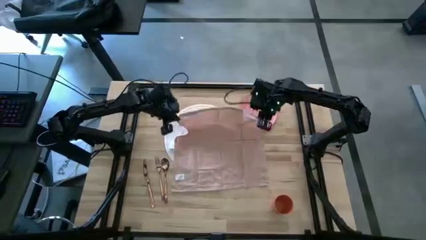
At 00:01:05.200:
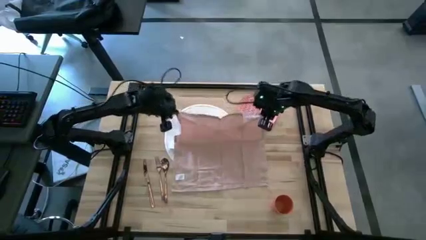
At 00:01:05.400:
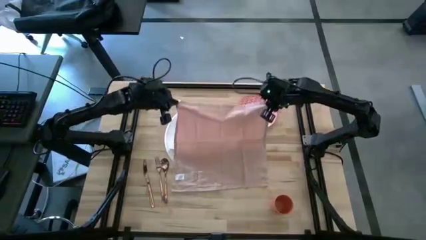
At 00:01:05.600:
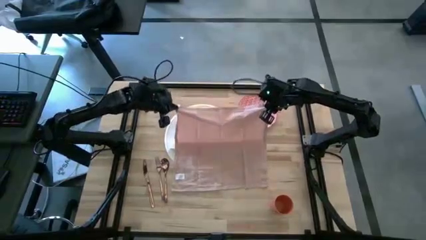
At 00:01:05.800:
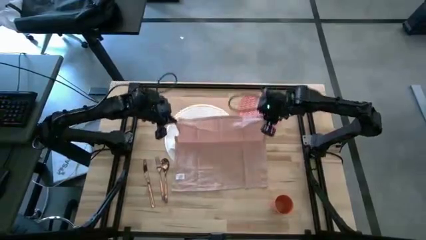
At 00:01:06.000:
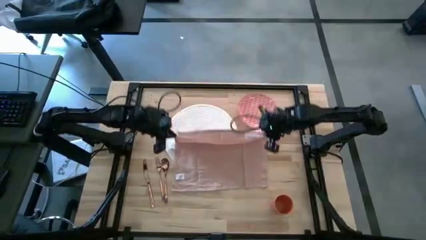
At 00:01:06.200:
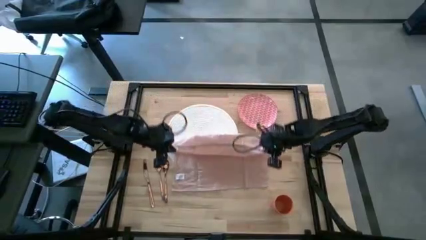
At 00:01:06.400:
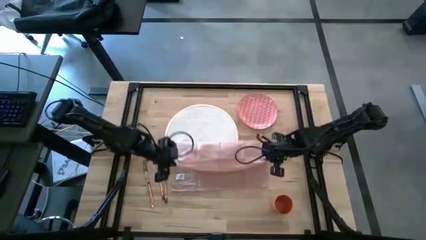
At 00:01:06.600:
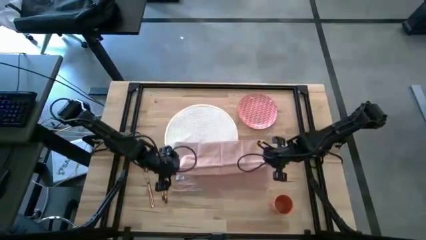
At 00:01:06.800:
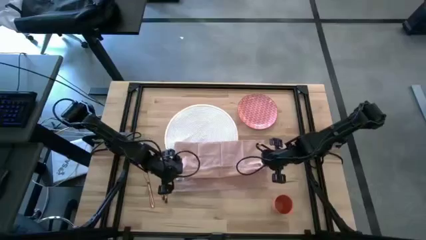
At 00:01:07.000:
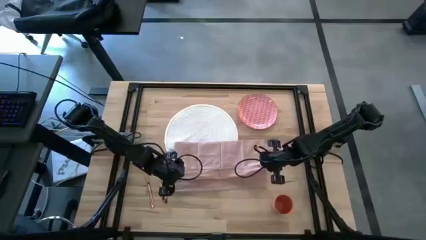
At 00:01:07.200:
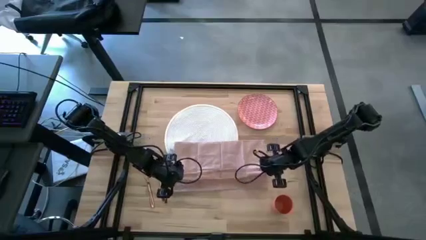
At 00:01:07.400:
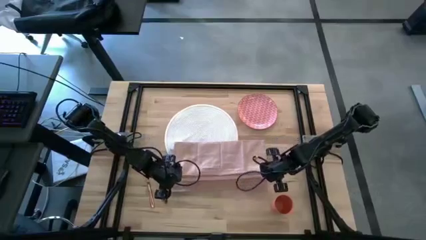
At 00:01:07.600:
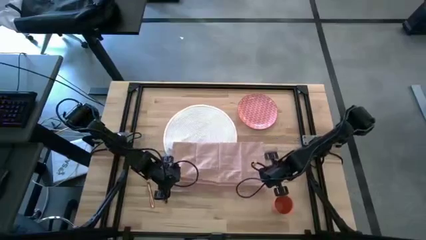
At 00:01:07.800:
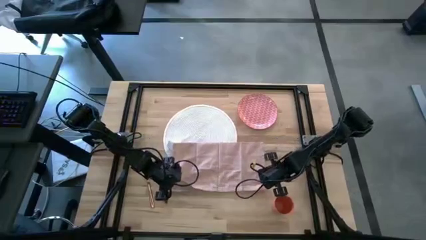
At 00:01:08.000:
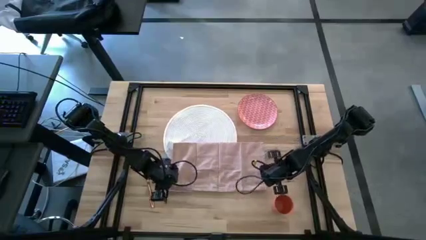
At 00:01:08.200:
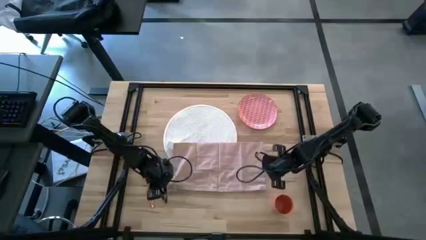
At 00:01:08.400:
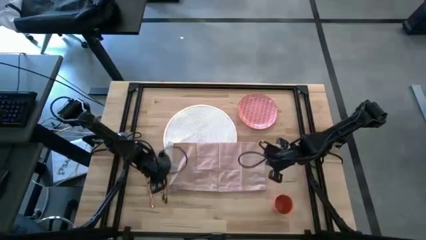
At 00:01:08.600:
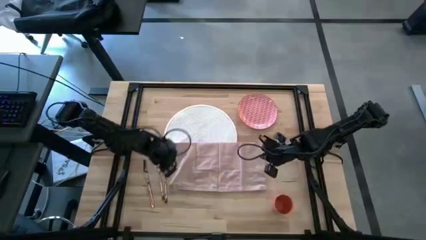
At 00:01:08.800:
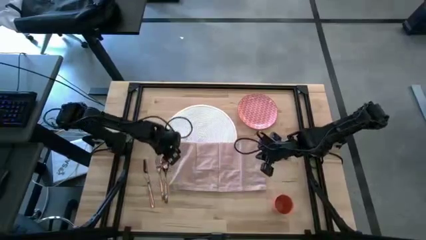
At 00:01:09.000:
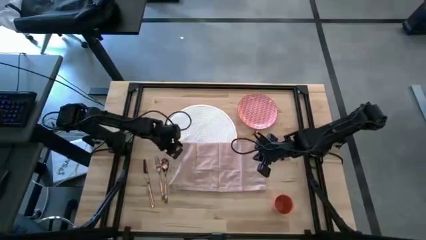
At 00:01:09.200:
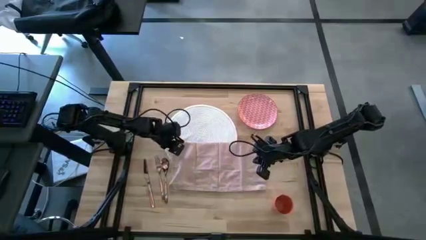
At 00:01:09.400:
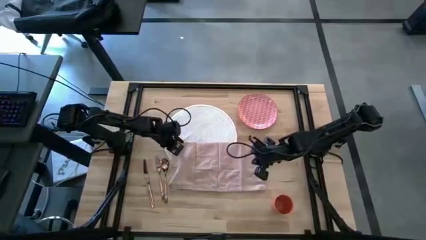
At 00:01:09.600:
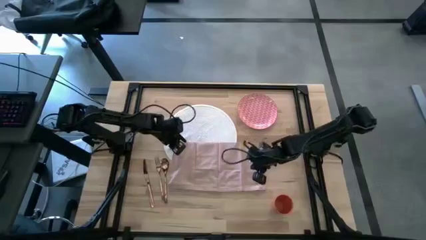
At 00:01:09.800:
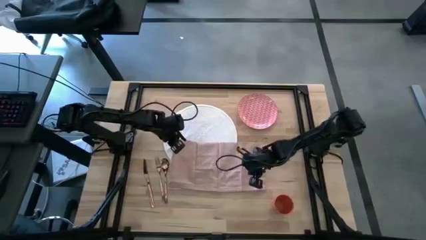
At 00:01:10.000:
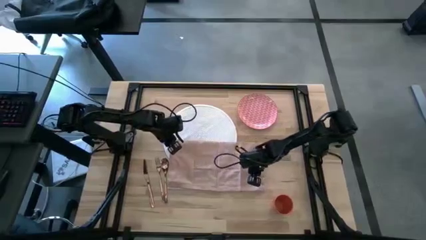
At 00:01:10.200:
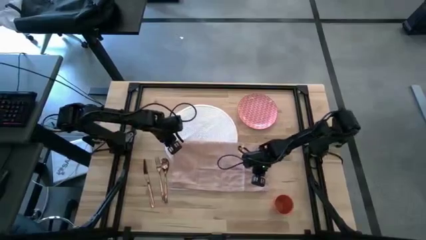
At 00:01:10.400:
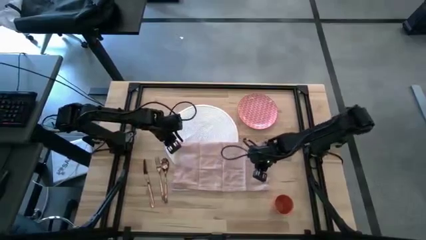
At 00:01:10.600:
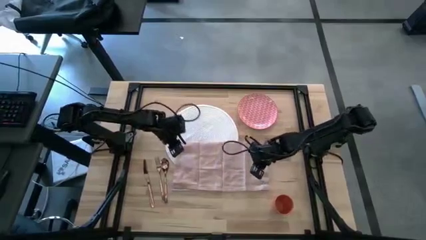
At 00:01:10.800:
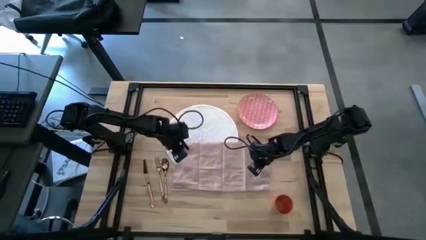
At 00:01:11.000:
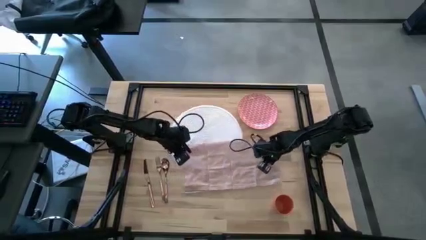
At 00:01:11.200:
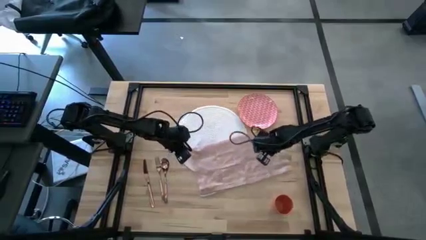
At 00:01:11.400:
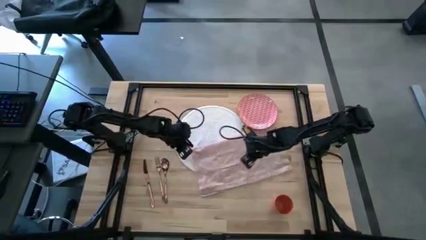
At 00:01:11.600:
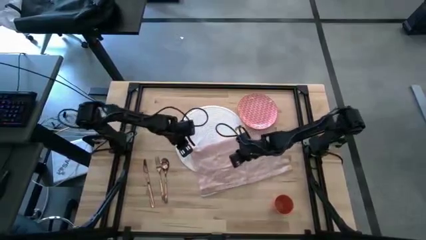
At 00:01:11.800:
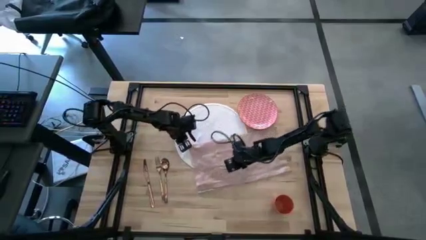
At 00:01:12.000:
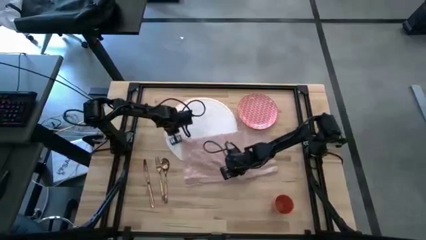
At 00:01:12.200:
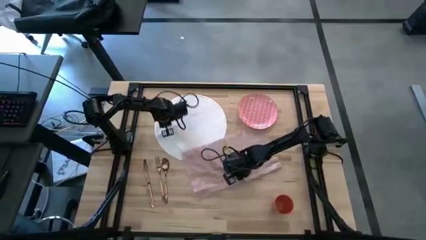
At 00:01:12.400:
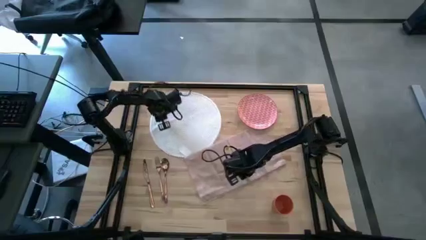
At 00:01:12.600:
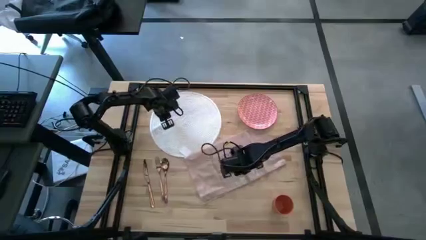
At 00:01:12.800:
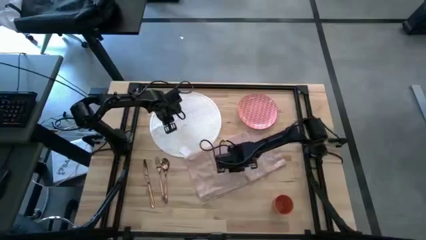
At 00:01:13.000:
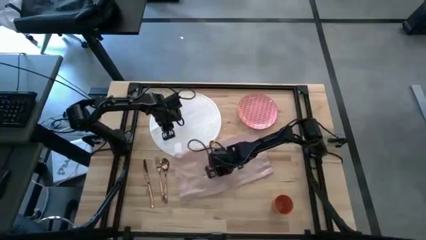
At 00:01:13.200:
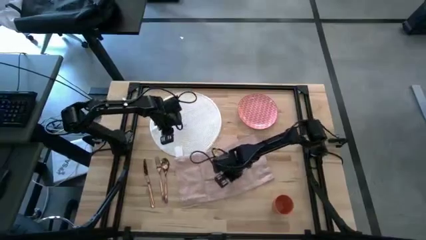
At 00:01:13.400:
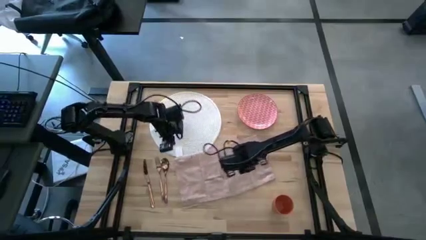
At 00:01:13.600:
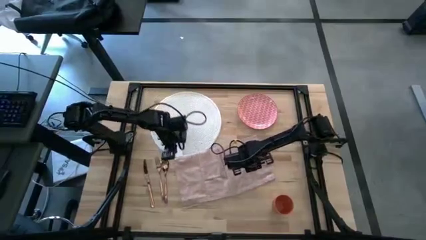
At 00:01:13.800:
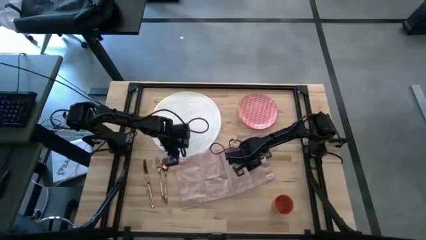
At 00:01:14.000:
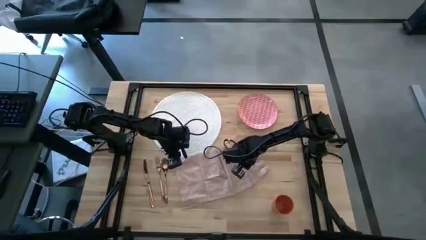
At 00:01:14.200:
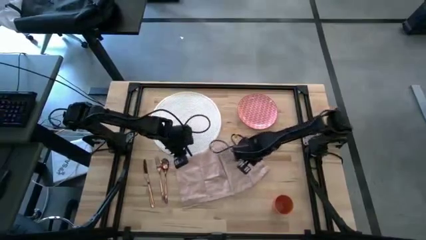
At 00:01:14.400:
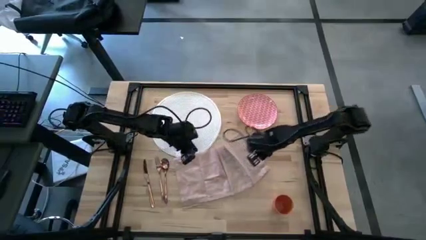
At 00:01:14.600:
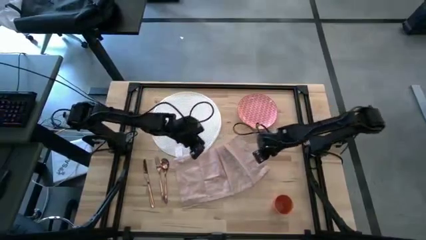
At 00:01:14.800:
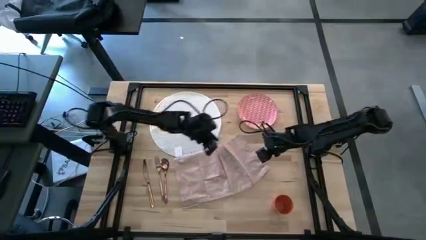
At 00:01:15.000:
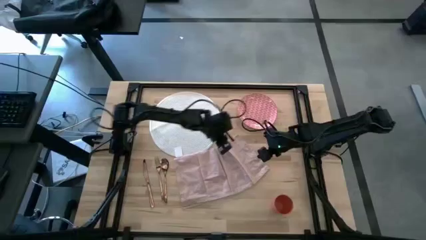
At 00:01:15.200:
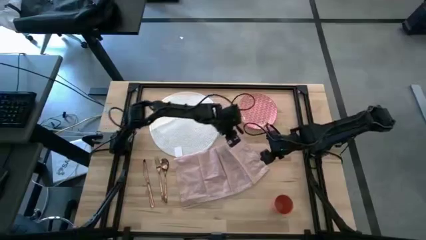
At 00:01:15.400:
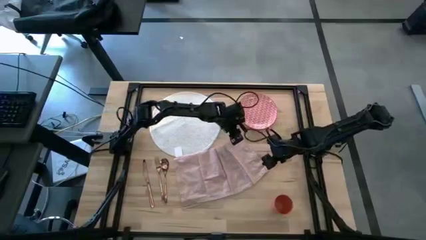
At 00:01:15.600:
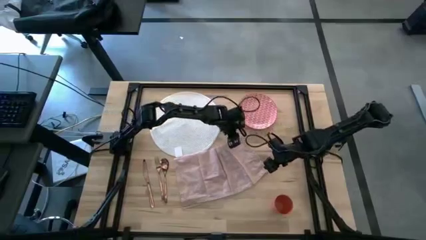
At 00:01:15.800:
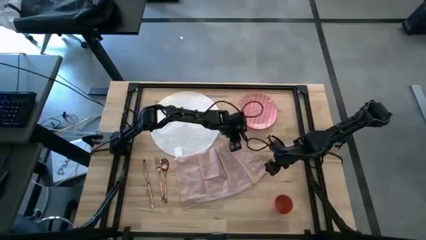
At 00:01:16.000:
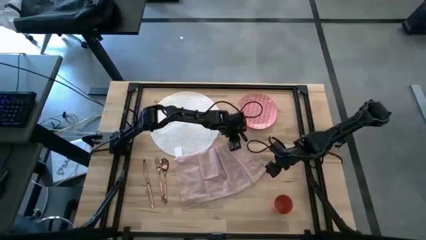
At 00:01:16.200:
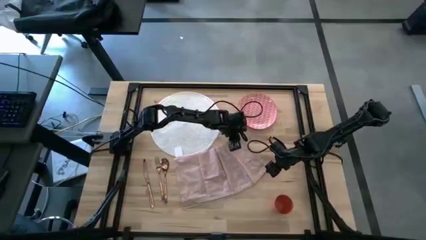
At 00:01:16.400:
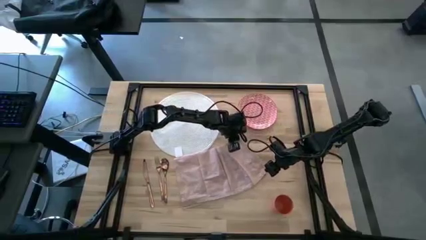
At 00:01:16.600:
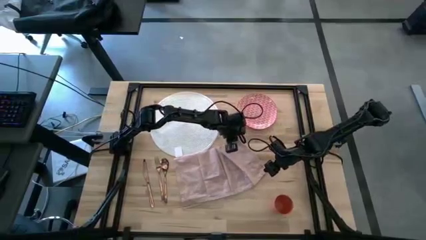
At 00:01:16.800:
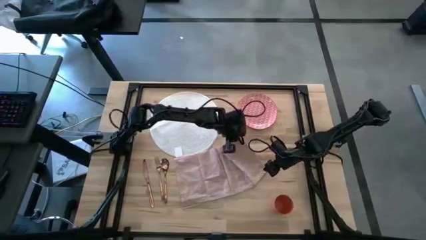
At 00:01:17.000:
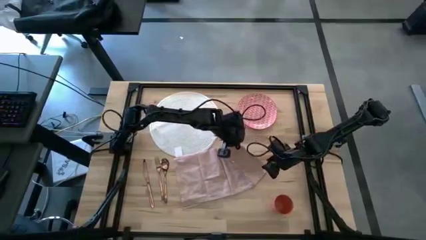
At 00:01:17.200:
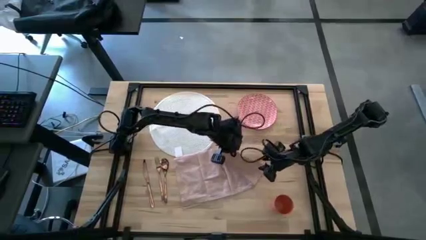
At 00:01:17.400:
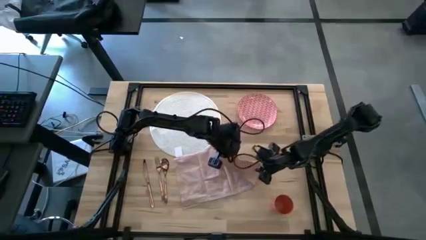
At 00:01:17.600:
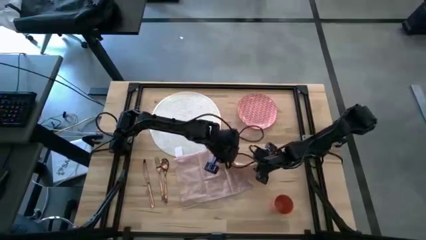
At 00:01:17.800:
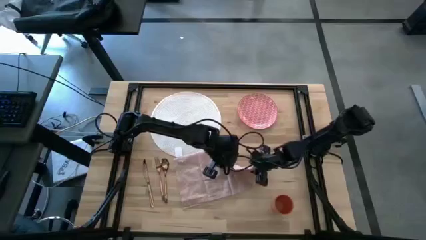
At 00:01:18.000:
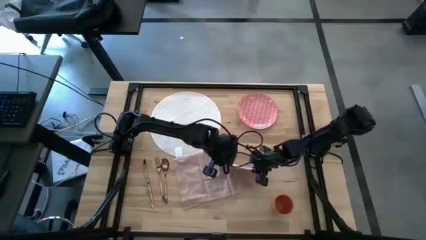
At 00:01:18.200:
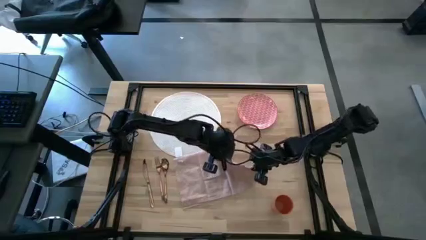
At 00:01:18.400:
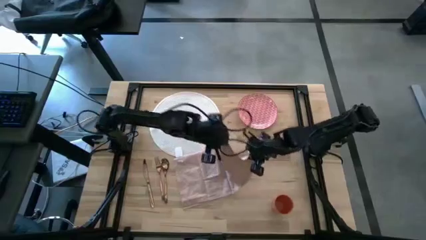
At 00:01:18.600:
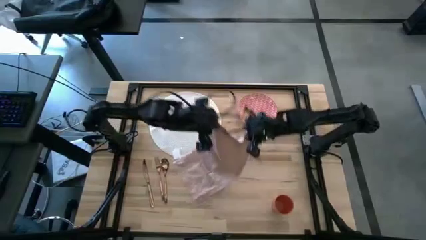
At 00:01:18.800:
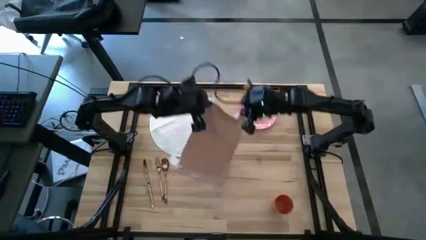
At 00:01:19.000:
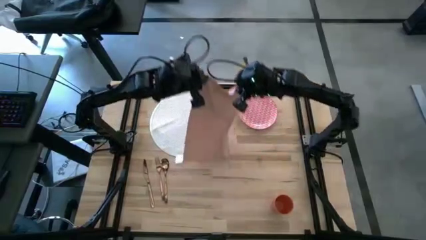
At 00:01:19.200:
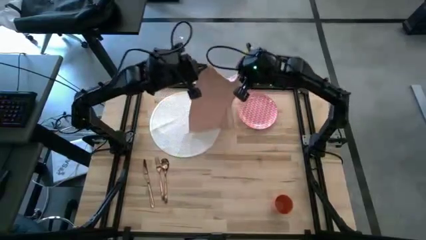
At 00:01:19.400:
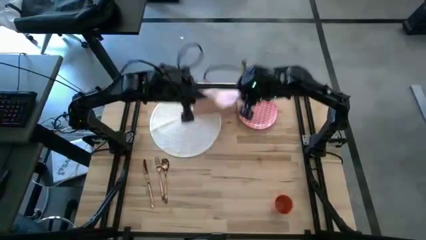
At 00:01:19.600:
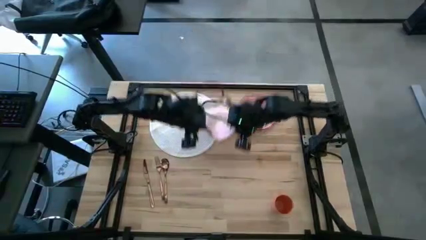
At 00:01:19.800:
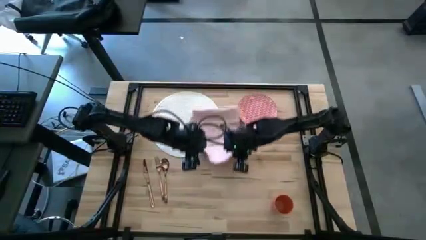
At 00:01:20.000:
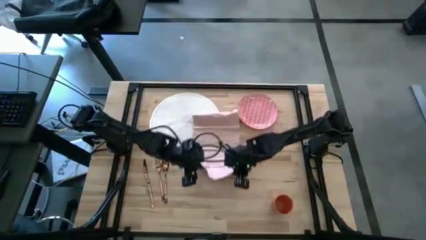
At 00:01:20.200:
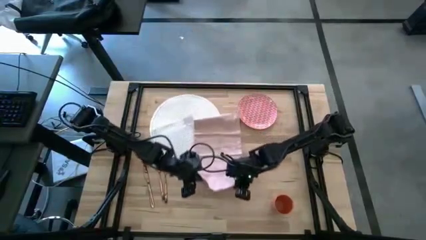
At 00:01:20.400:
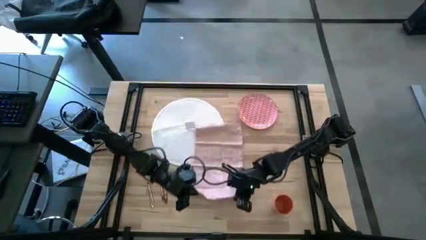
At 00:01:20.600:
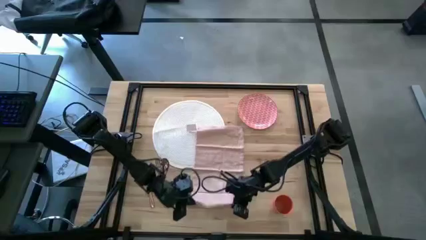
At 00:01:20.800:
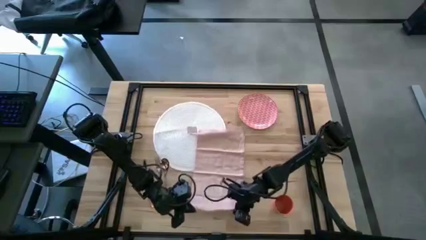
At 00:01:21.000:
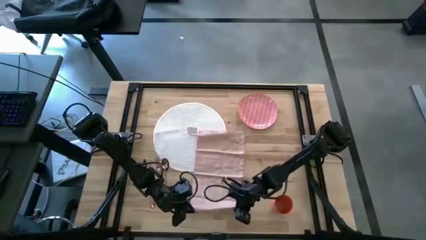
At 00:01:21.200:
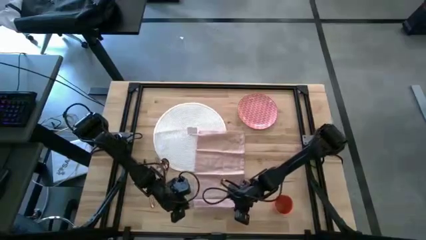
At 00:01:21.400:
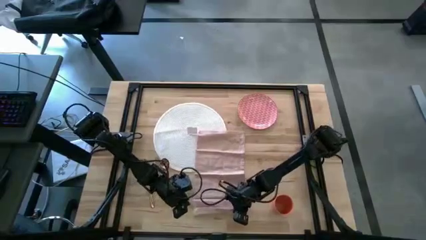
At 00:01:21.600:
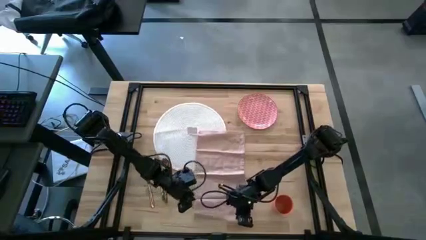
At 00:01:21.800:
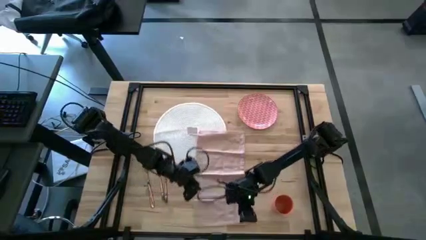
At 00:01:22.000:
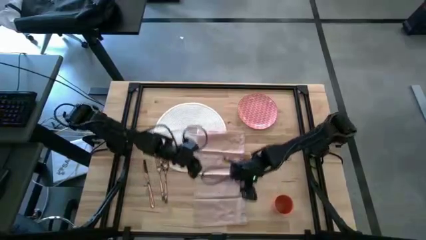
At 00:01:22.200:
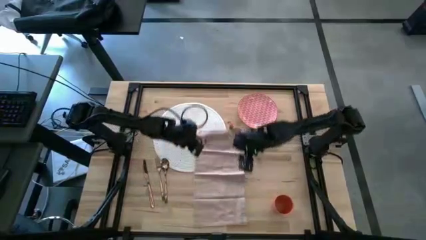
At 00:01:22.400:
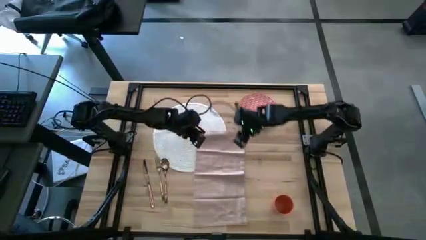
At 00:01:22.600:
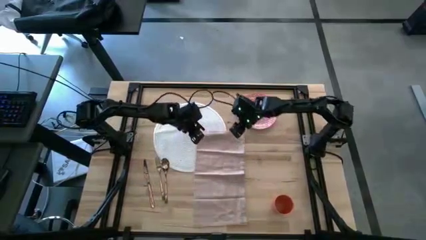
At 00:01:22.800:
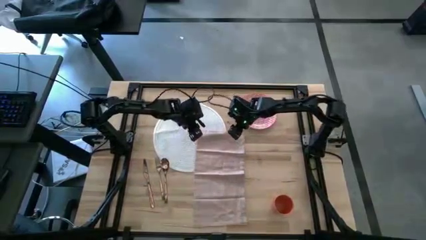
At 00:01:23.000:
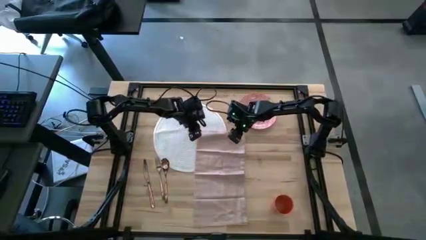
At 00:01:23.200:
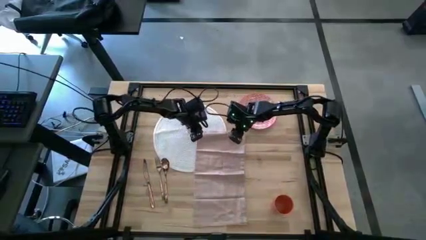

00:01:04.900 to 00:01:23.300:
Task: Set table place
Fold the pink napkin
